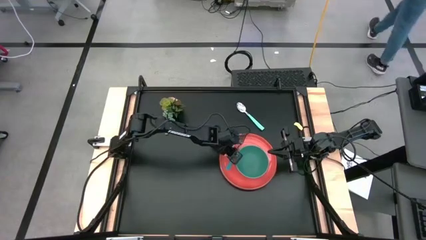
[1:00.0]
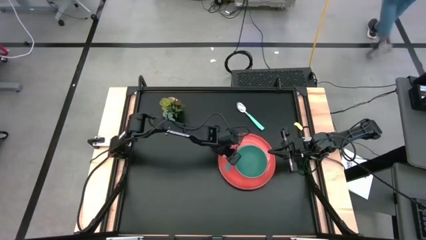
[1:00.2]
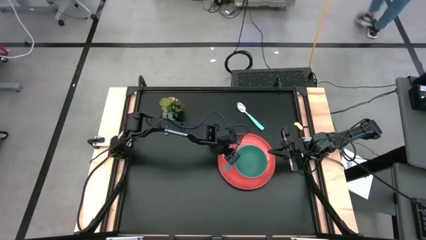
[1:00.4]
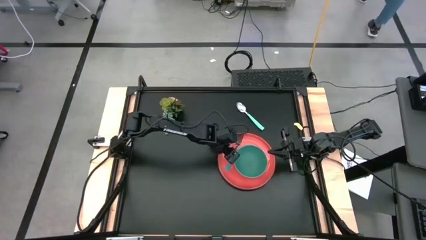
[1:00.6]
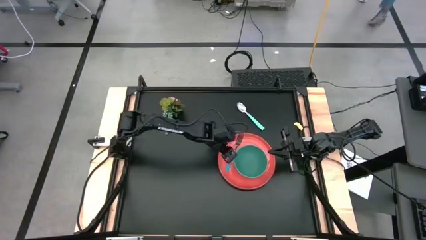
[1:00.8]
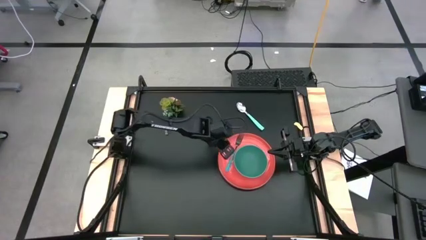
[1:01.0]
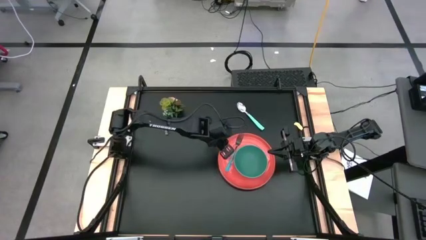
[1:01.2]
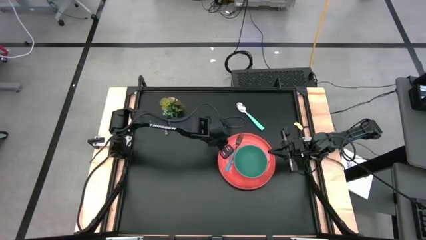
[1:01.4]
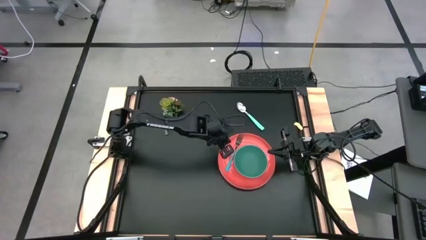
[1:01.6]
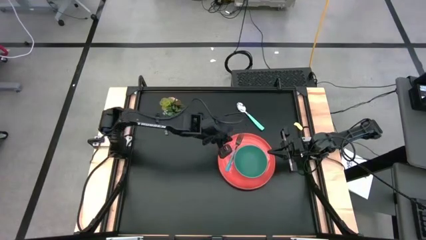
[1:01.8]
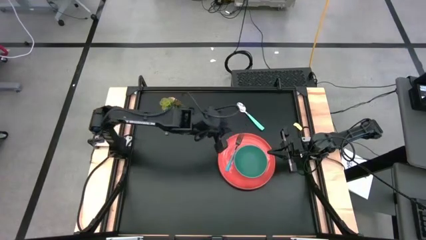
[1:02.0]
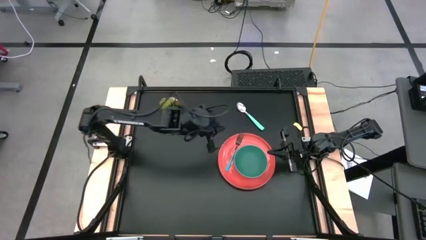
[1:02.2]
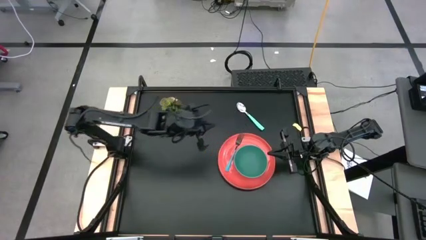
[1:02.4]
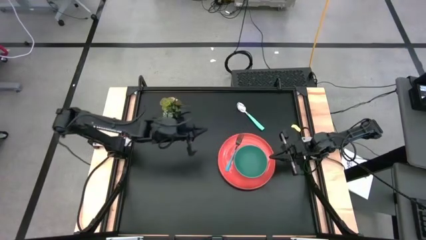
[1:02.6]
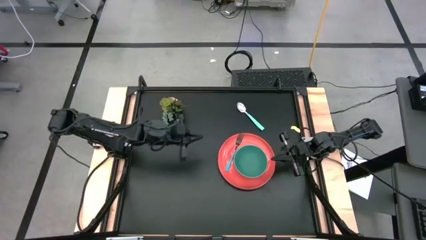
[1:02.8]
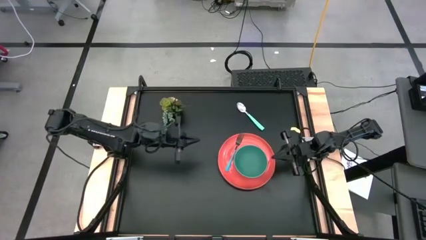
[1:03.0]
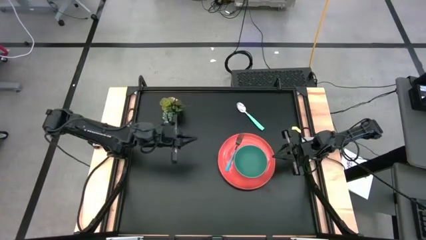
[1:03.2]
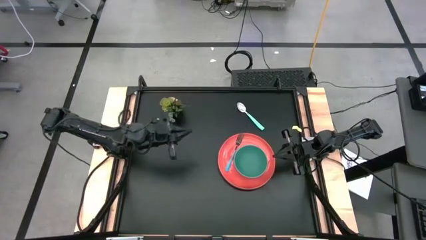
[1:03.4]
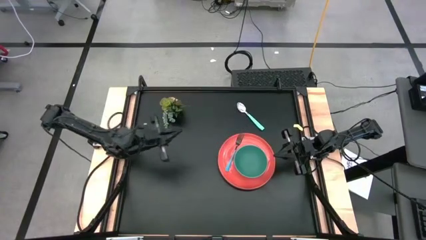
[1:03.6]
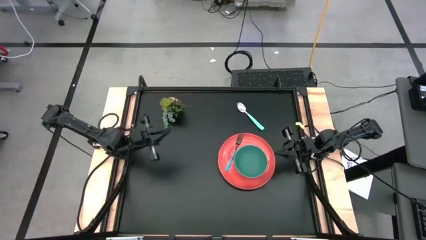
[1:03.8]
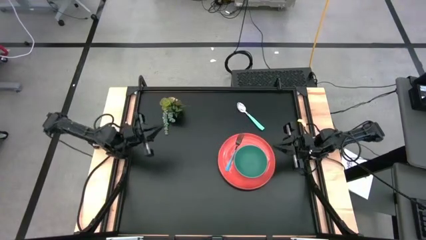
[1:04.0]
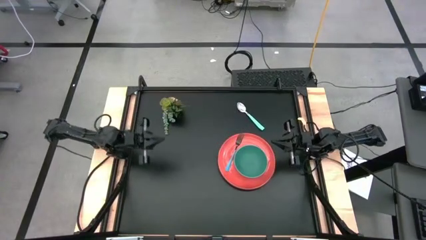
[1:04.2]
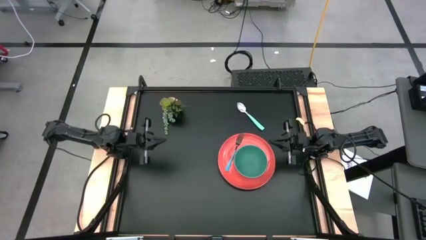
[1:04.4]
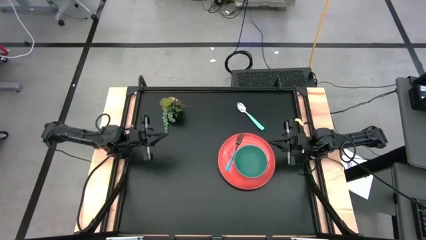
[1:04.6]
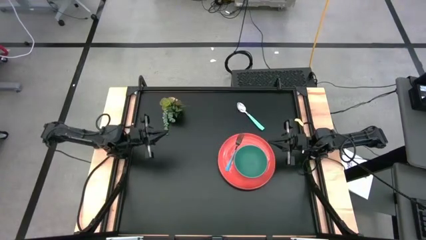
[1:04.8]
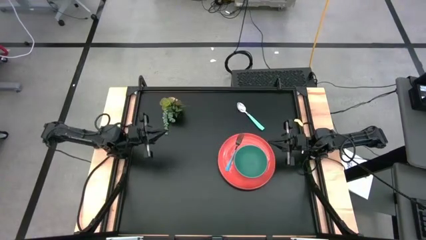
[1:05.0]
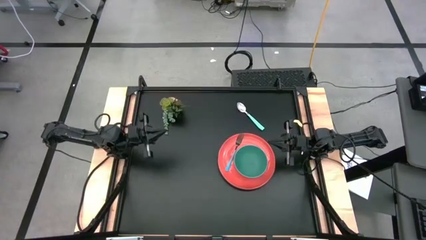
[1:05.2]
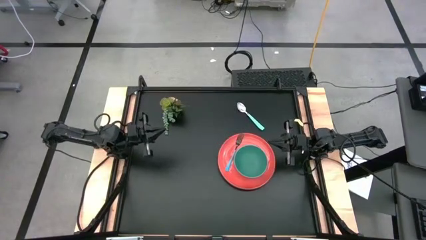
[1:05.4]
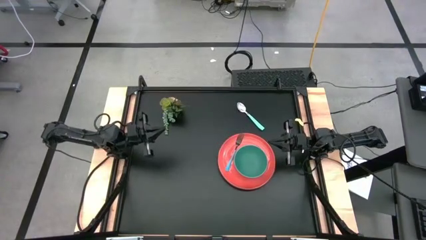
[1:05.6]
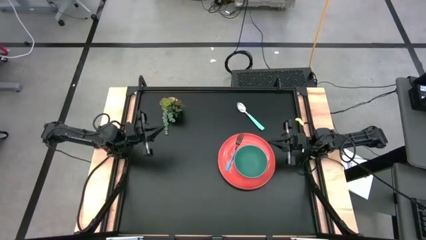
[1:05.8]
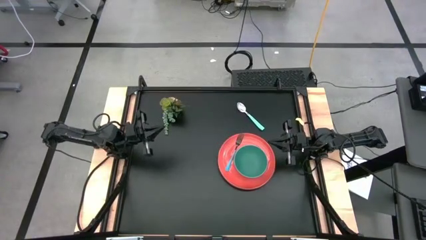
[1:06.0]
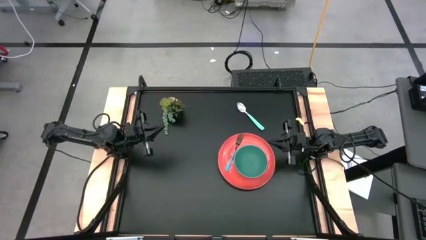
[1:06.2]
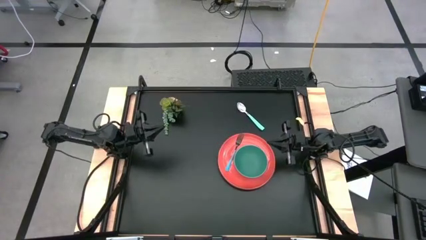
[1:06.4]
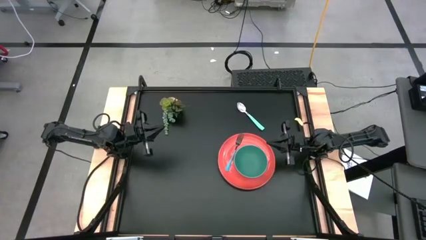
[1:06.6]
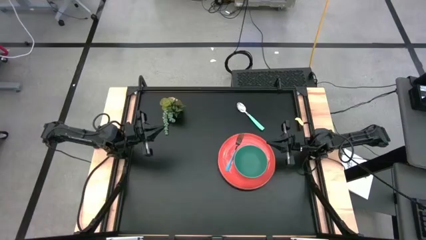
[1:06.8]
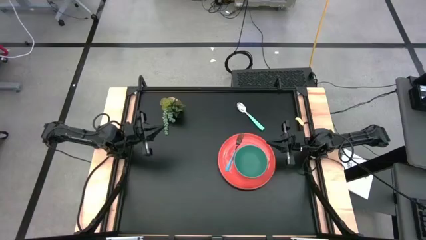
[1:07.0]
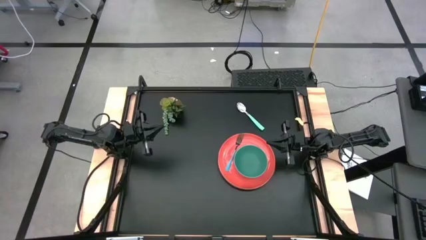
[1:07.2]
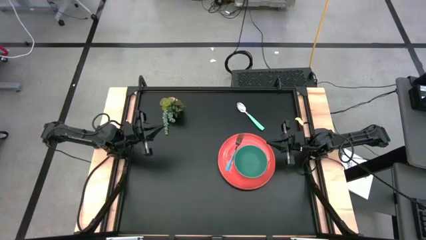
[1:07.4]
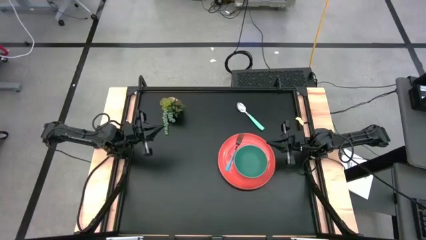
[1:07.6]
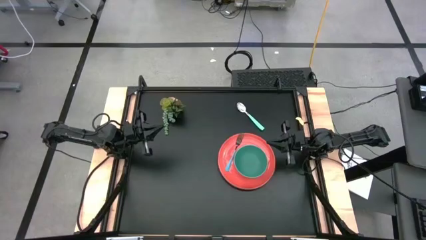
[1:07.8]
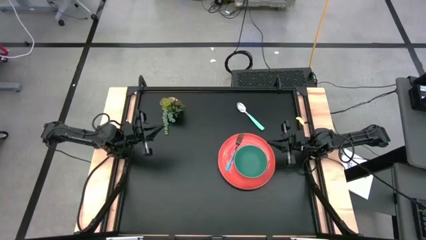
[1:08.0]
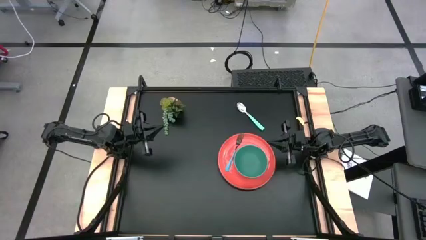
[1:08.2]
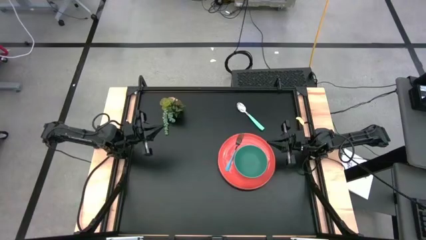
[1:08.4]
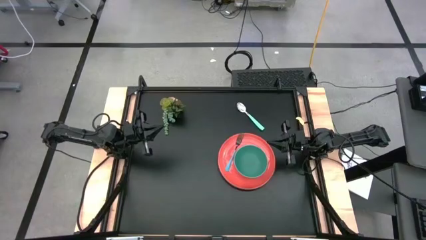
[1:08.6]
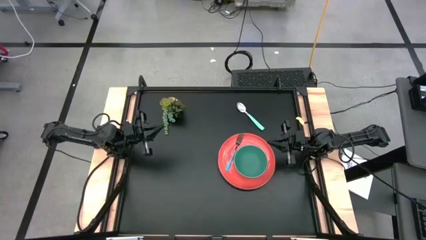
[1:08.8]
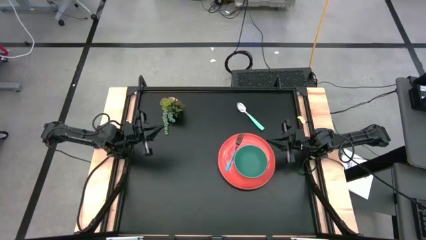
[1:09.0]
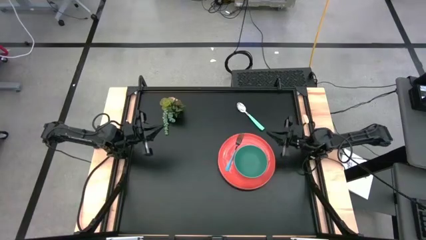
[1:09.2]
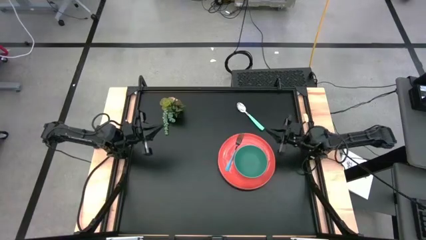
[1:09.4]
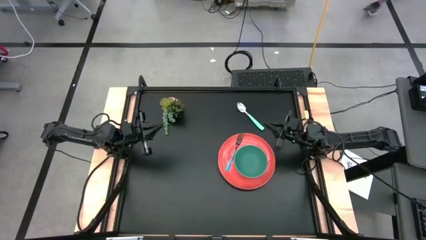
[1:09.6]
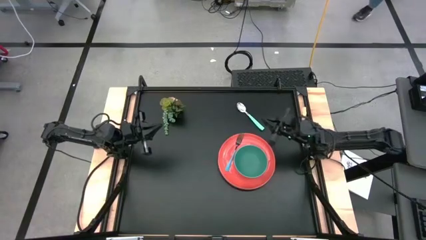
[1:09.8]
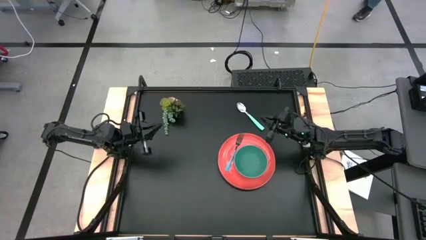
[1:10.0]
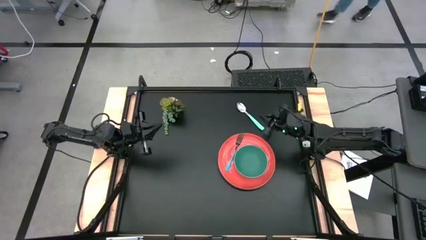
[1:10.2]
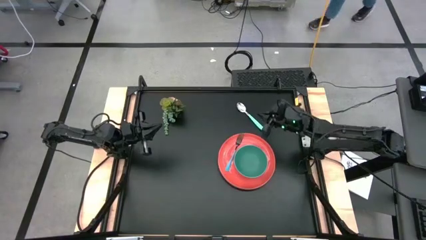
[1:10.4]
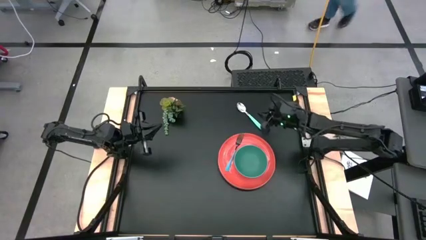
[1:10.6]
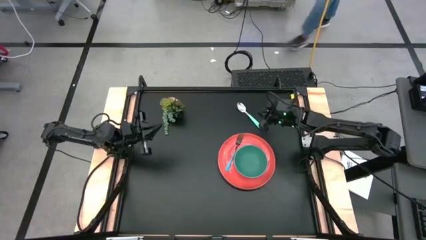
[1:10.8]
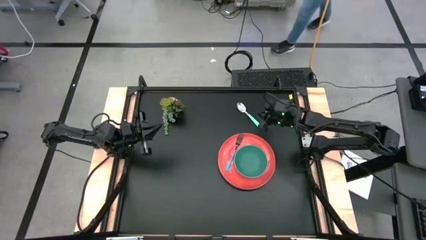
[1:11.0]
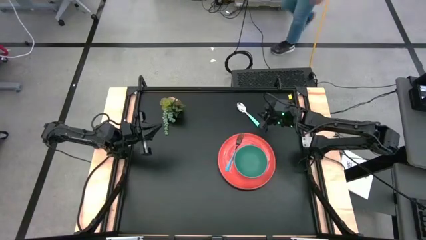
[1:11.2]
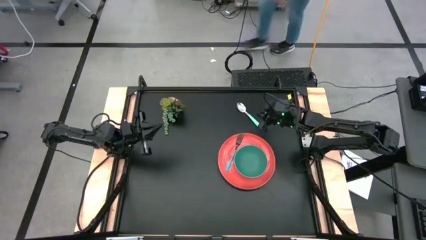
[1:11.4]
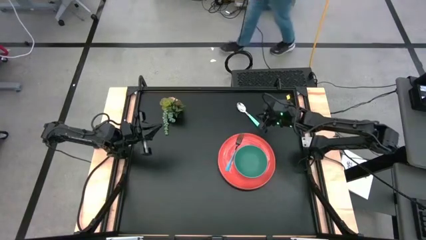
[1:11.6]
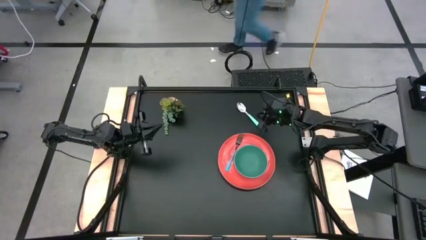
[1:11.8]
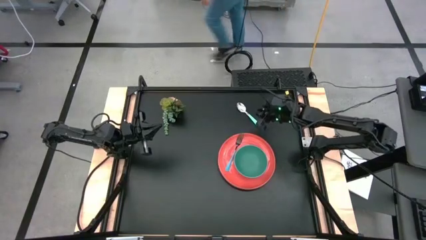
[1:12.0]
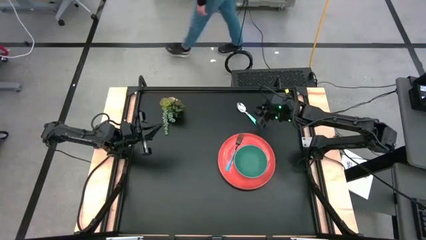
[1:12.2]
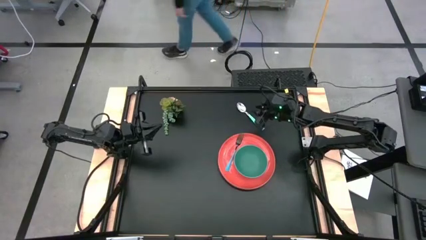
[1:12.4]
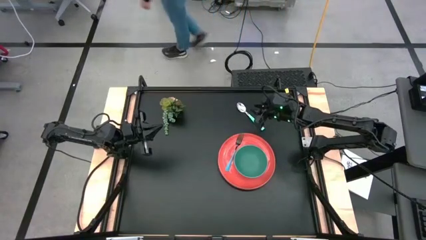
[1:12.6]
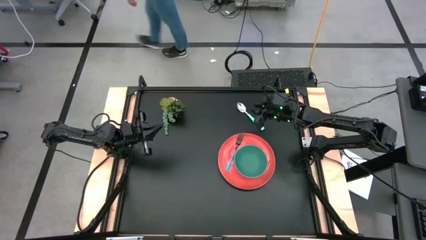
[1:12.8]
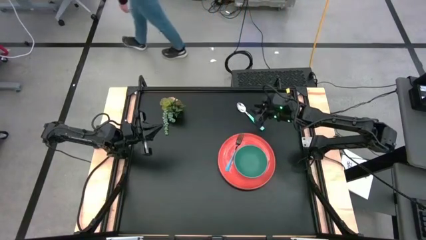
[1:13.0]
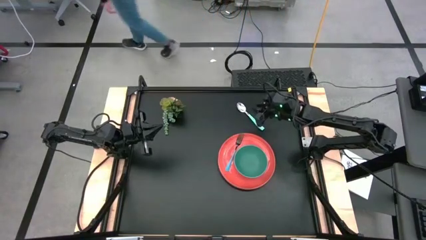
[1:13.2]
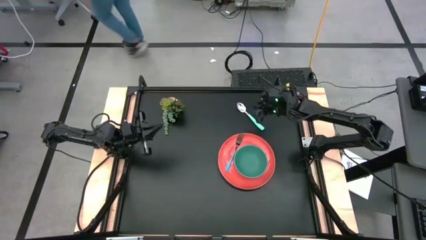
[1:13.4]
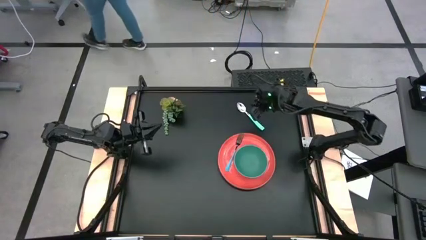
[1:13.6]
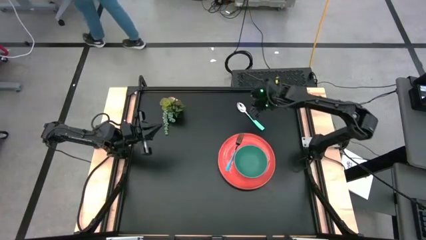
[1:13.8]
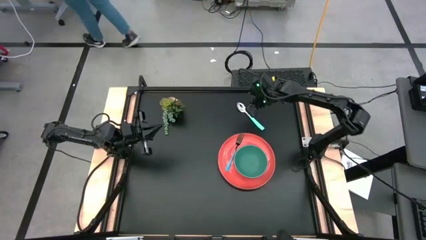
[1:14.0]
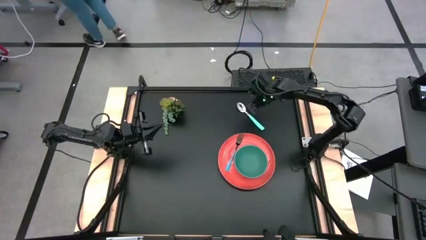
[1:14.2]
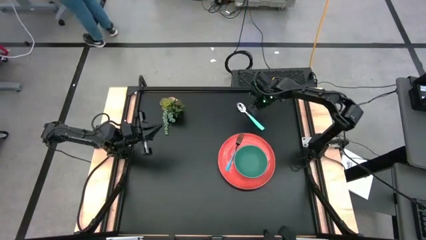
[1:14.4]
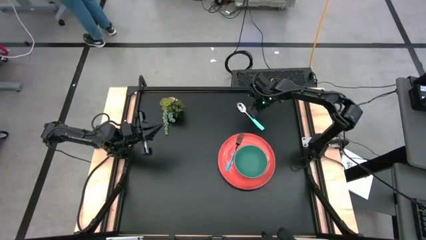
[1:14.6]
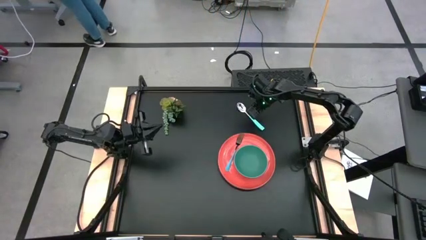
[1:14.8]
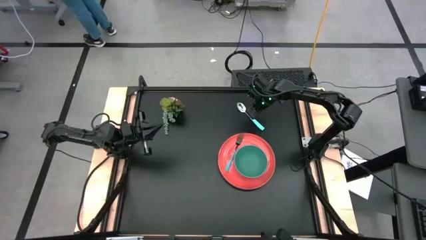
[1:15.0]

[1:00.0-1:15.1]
Task: Set table place
Put the blue spoon into the green bowl
